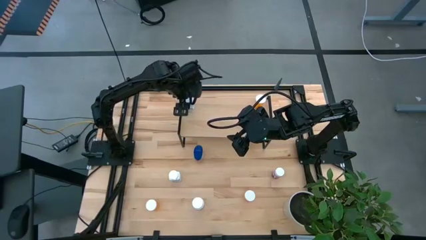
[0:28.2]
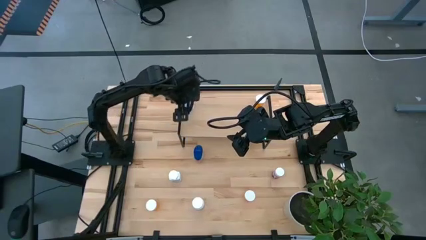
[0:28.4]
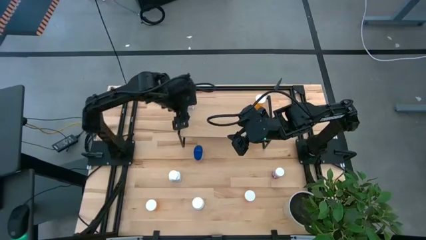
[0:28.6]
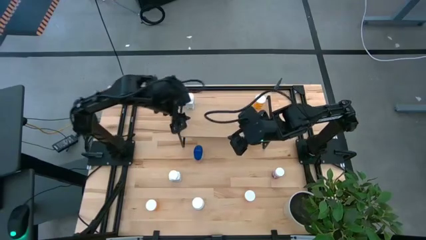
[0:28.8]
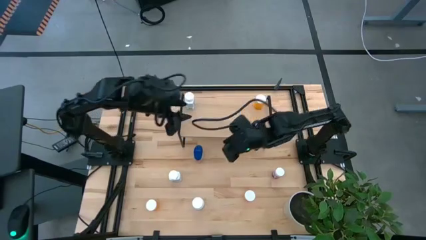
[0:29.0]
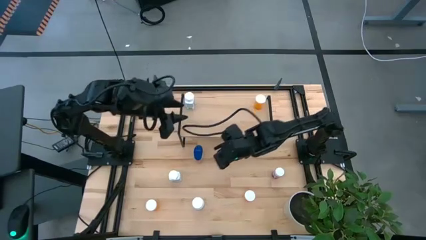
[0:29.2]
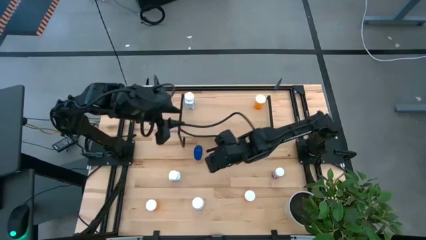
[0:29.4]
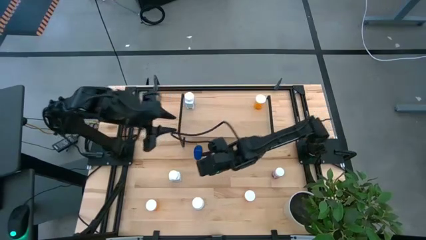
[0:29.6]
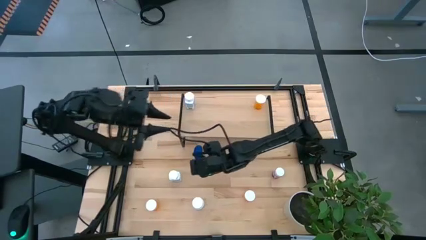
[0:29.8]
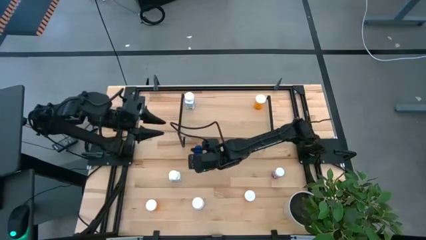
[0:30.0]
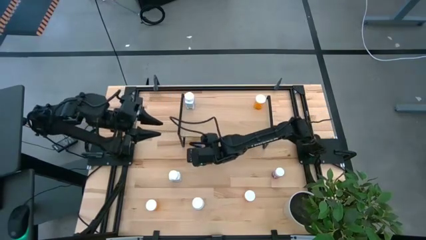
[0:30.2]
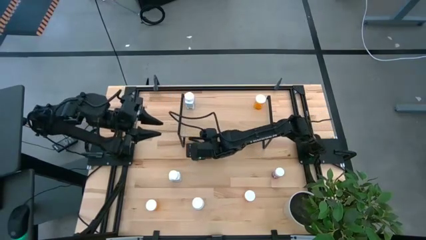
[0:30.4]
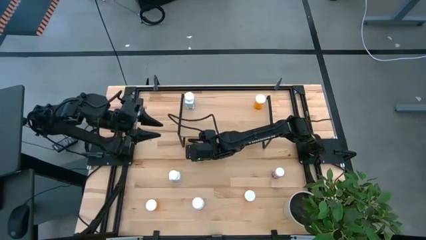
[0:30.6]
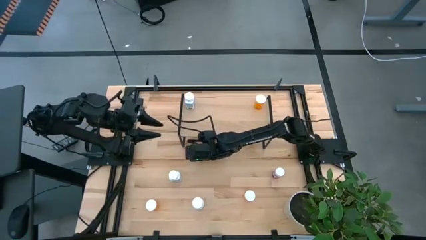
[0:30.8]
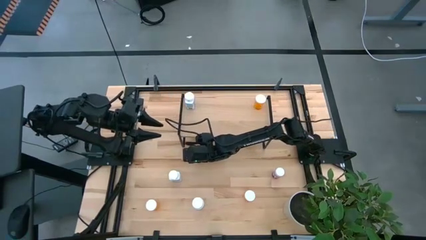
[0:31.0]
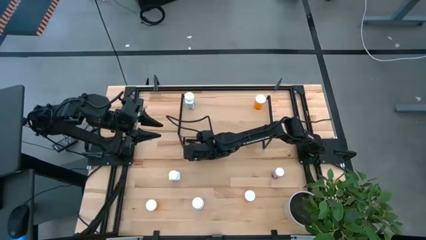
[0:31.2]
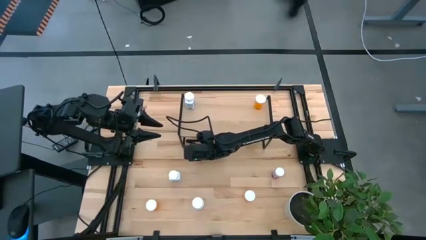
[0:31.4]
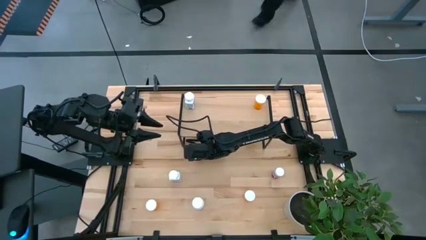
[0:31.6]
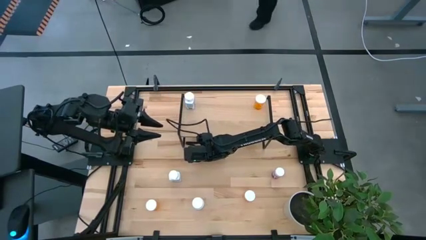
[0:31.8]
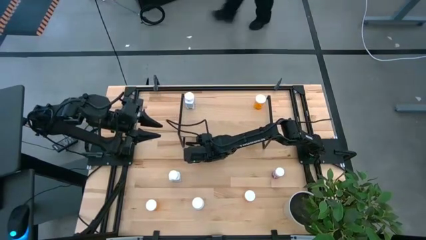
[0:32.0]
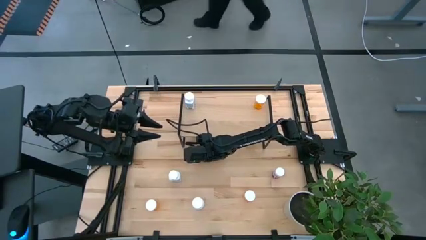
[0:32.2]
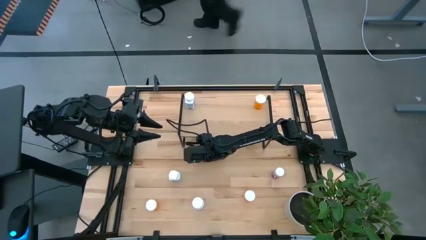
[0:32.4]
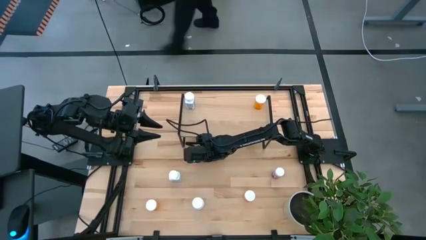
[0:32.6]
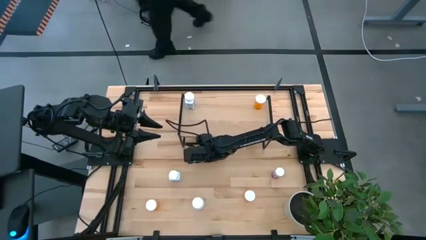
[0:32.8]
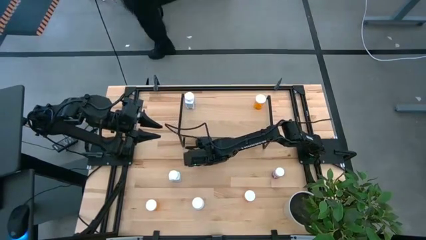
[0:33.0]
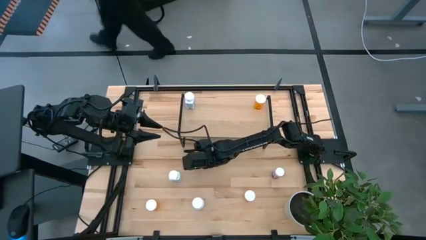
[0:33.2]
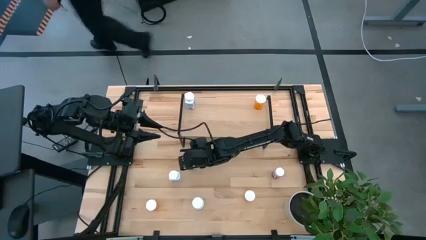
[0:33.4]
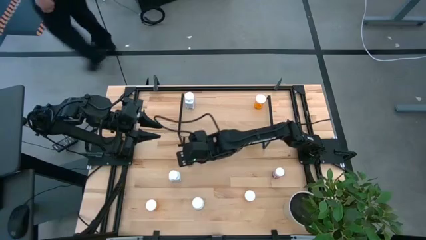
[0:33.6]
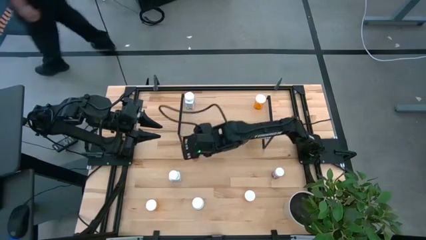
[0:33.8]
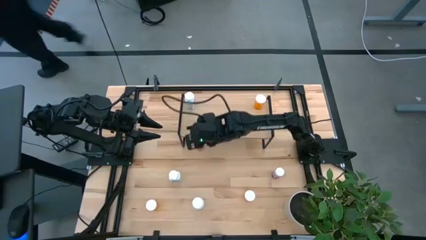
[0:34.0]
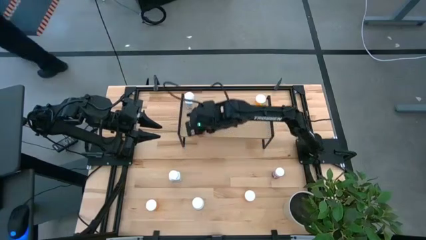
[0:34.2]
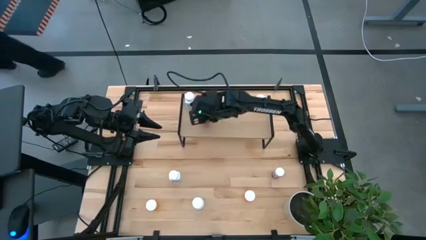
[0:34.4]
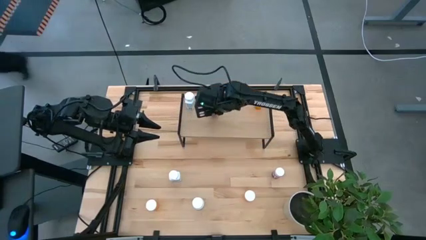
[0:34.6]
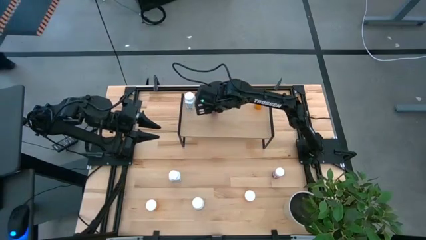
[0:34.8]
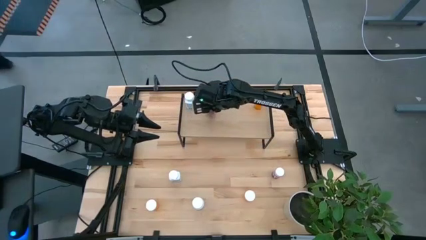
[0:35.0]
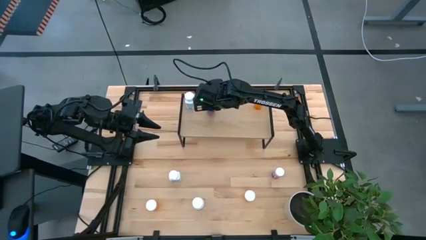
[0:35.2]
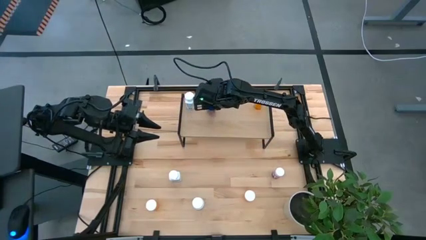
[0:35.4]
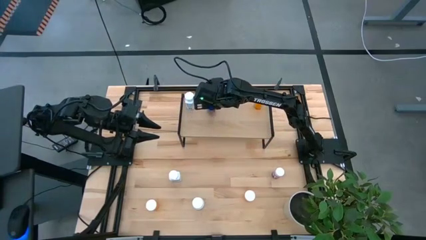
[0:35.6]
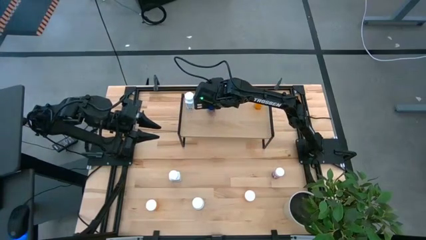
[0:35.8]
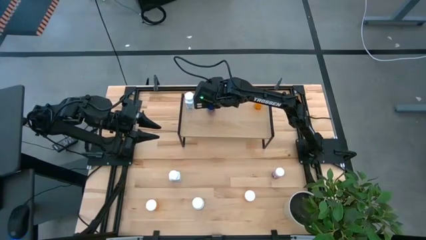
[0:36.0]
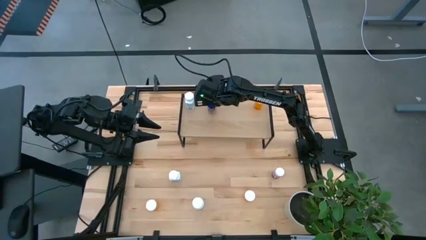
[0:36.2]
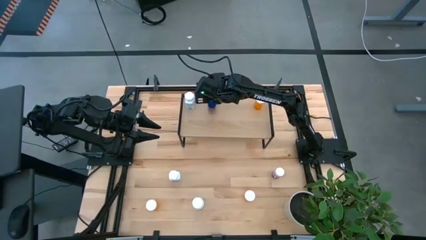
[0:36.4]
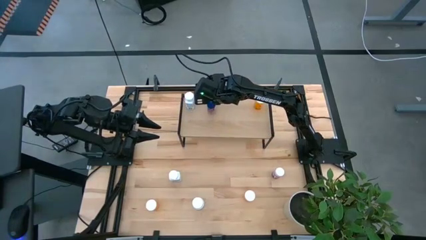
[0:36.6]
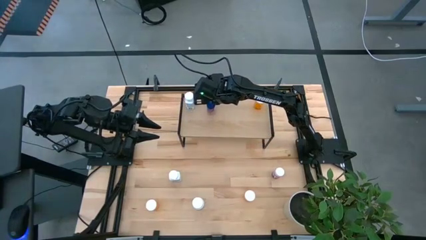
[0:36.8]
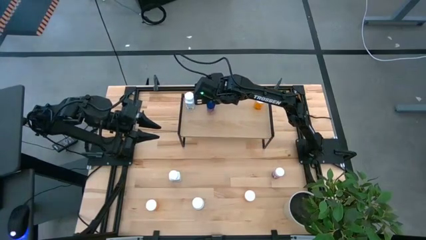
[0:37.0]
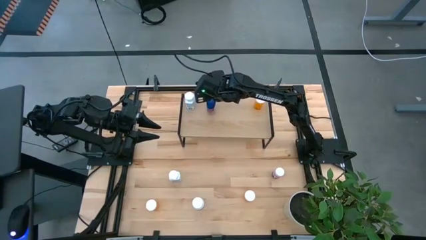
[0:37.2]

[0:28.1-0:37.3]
Task: Pick and place medicine bottles onto shelf by color
Put the blue pill bottle on the shelf

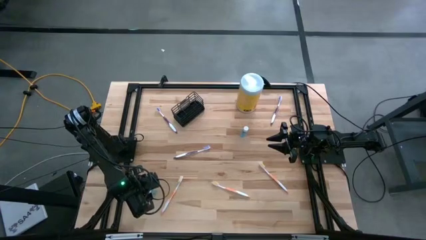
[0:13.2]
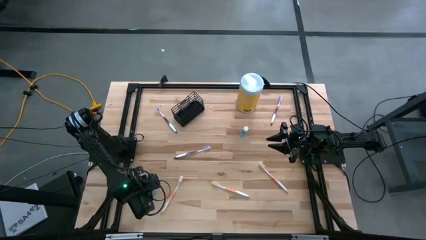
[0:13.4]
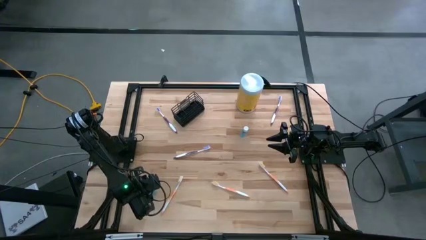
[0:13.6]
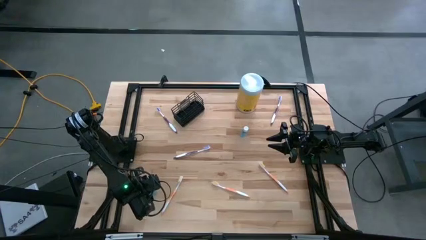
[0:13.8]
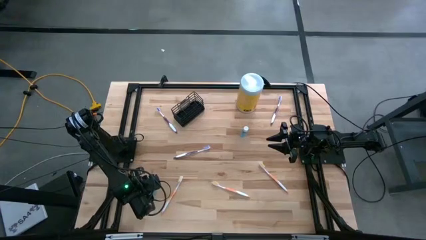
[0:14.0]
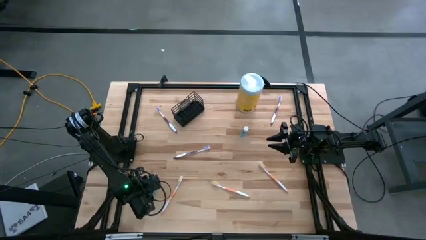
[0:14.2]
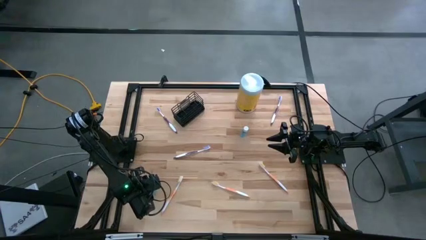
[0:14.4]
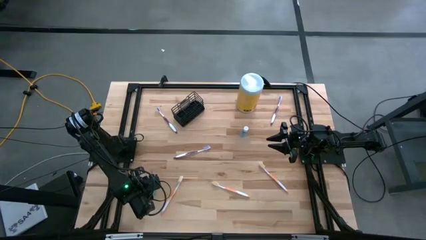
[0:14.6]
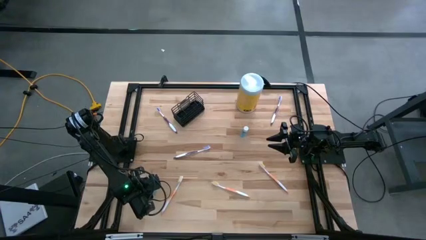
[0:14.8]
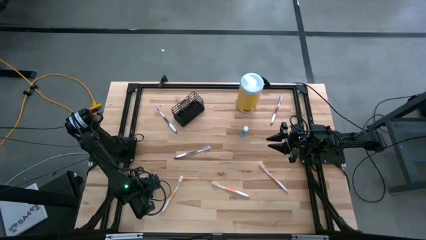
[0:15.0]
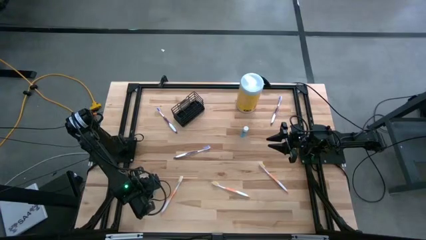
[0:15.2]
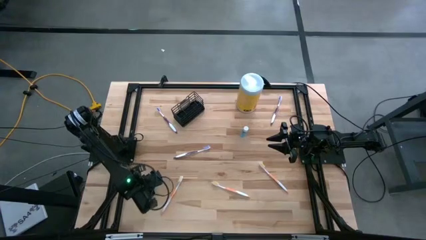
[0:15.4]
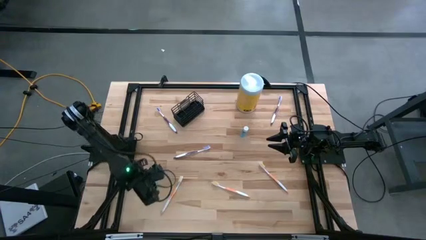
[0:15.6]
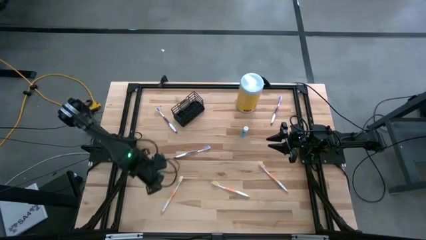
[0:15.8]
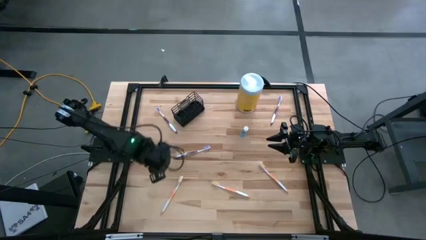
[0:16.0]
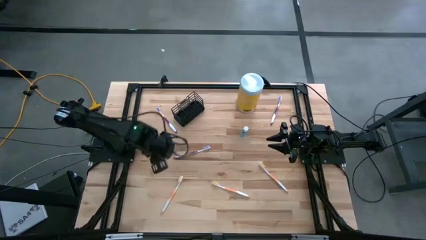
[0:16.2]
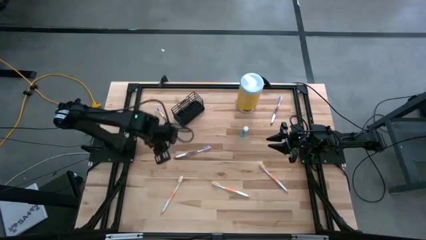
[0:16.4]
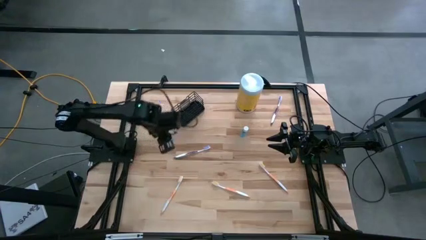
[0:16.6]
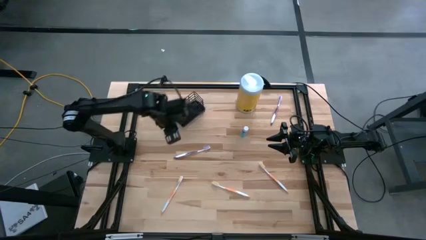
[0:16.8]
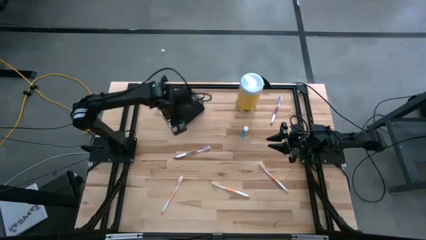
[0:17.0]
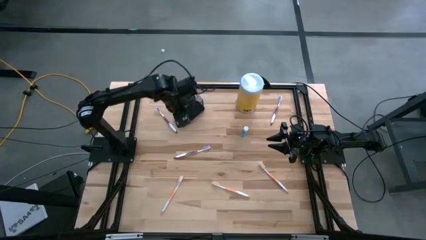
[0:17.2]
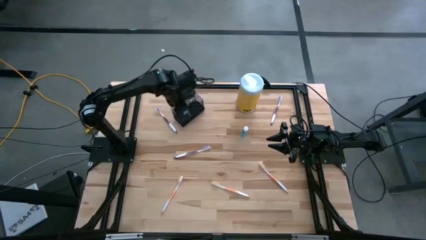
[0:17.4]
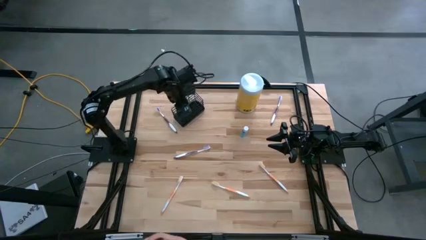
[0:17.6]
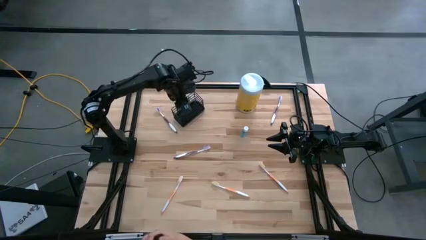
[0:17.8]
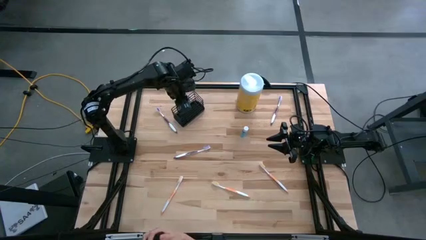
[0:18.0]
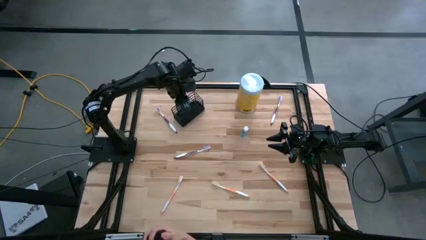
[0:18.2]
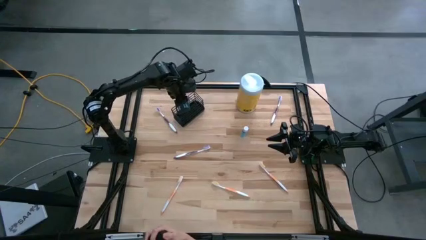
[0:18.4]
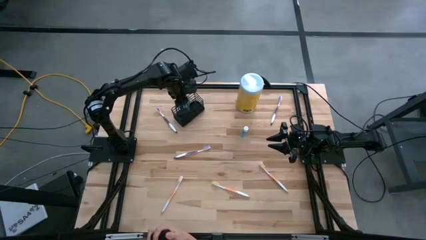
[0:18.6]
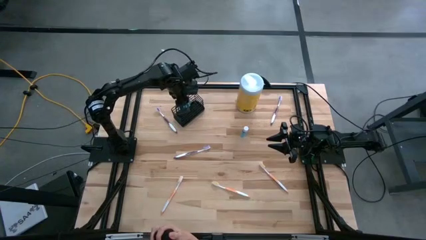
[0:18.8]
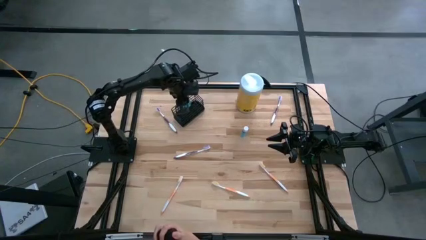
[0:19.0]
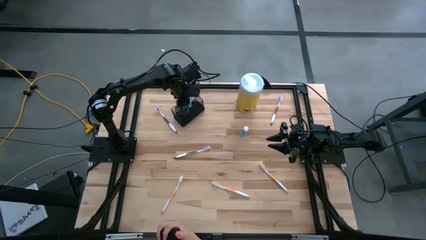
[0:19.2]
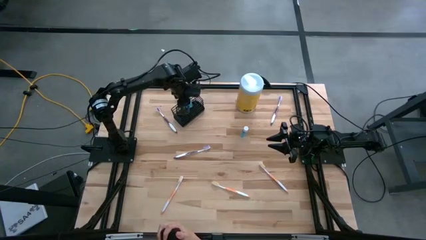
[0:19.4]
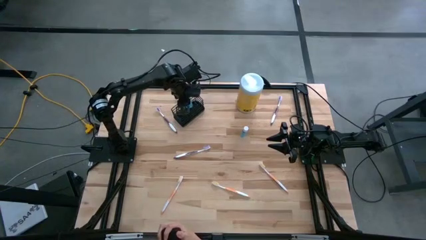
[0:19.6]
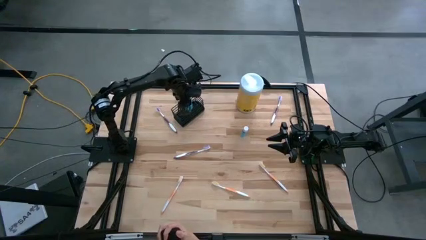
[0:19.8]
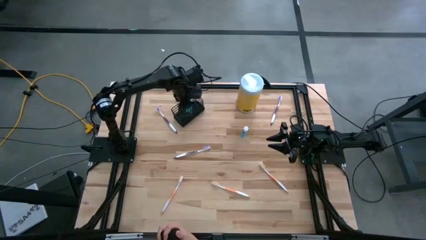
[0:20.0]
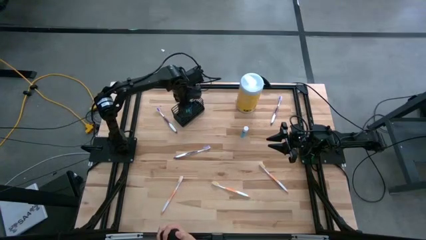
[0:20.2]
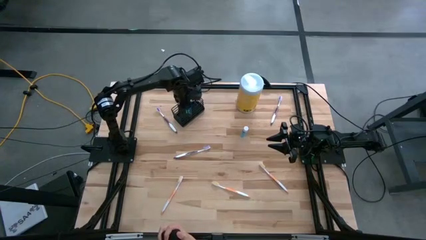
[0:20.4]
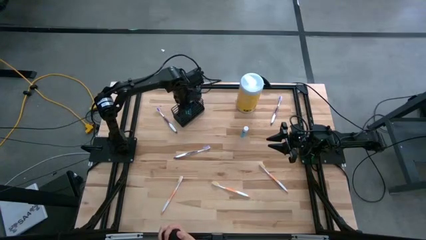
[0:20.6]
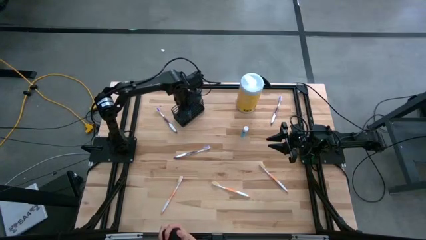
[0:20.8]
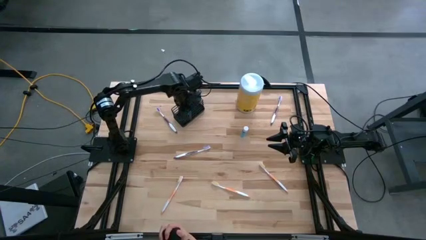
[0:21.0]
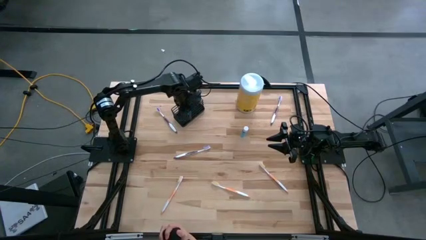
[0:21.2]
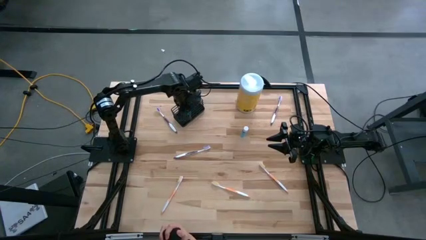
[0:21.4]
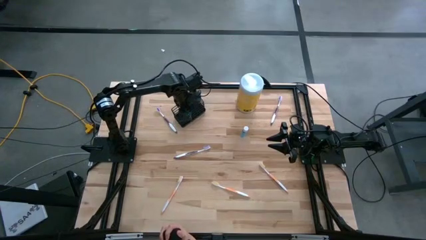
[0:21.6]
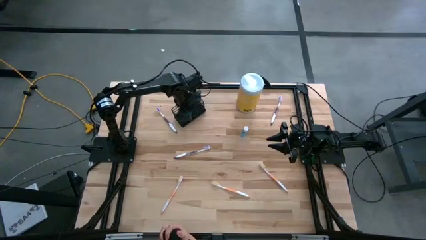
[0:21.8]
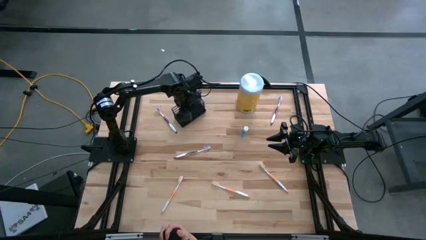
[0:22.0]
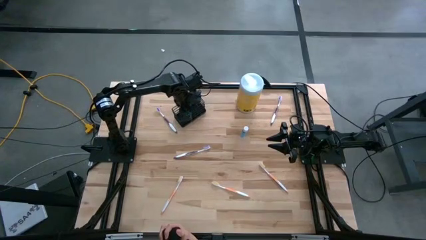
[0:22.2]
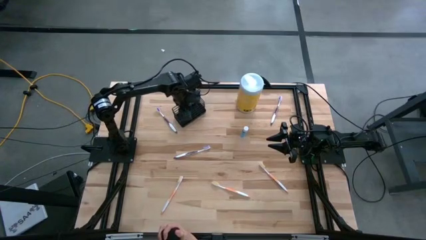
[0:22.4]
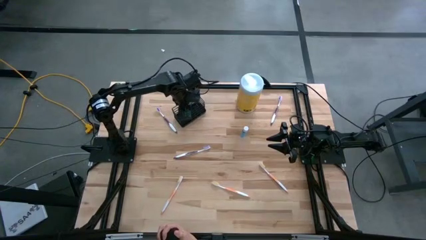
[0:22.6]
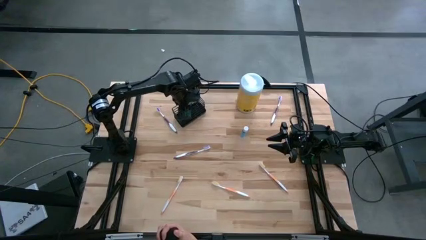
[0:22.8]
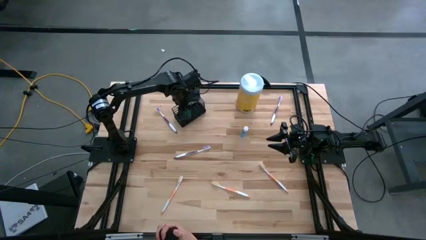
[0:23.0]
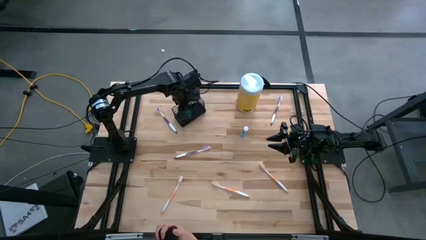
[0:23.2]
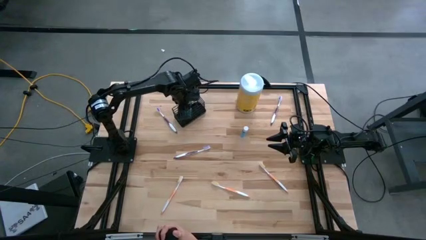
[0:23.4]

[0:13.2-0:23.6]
Task: Pick & Place toothbrushing station
Put the left mouthwash into the middle section of the wire organizer
